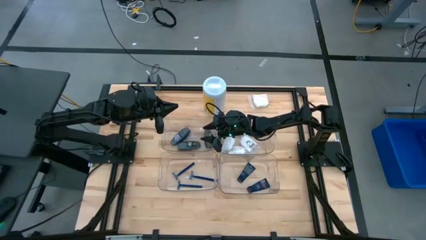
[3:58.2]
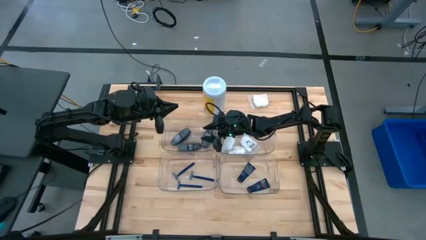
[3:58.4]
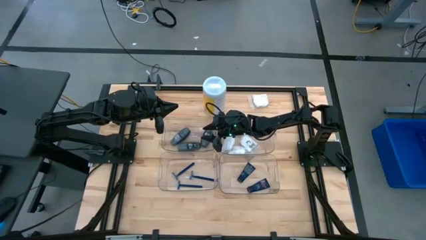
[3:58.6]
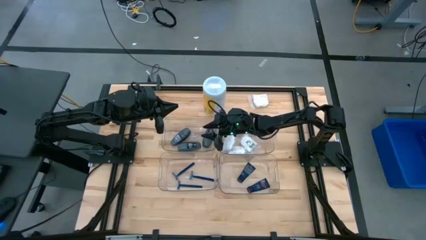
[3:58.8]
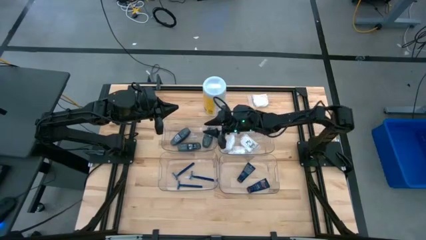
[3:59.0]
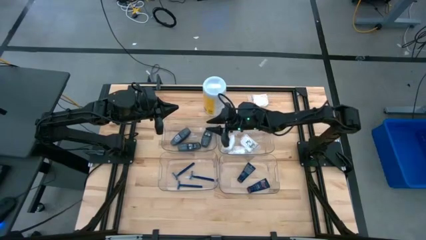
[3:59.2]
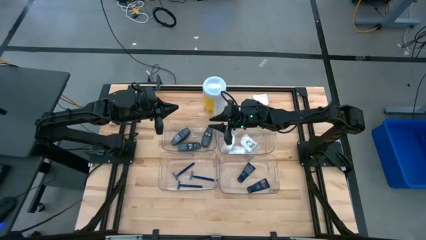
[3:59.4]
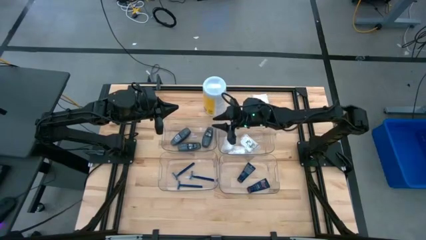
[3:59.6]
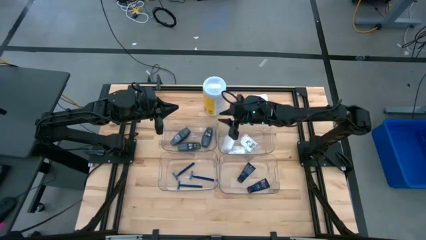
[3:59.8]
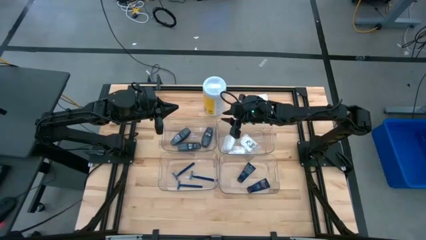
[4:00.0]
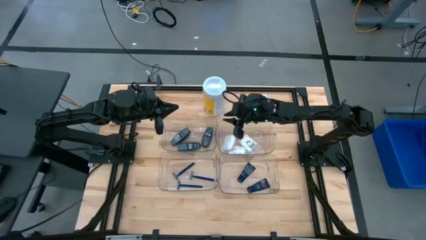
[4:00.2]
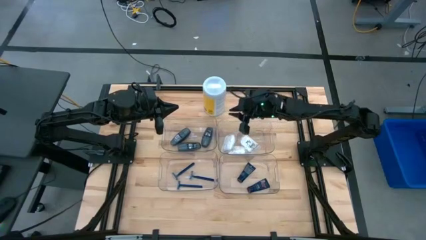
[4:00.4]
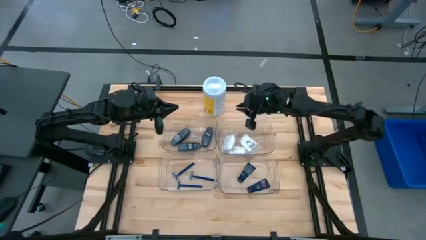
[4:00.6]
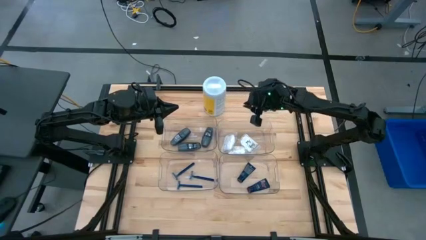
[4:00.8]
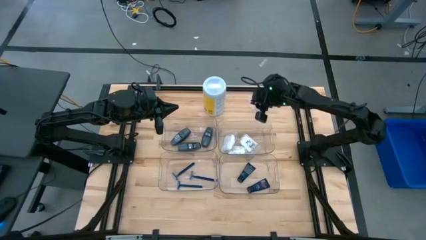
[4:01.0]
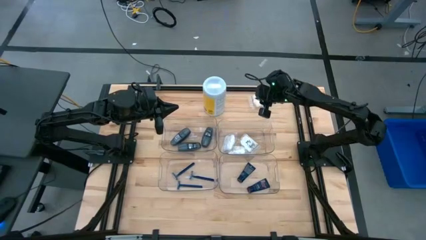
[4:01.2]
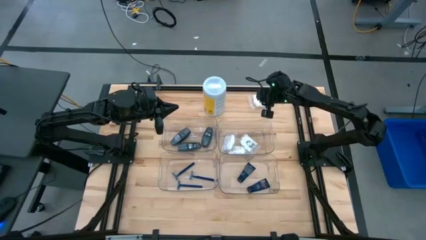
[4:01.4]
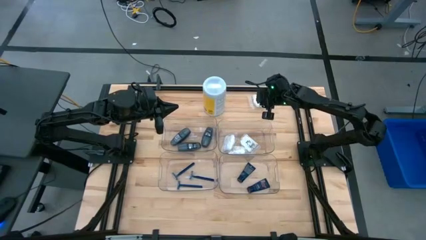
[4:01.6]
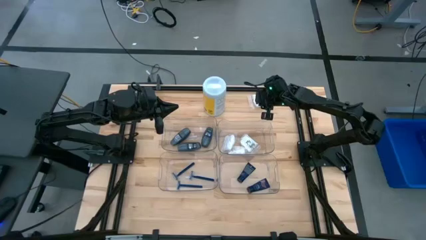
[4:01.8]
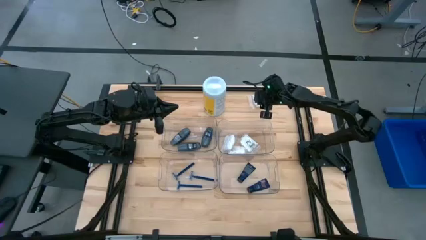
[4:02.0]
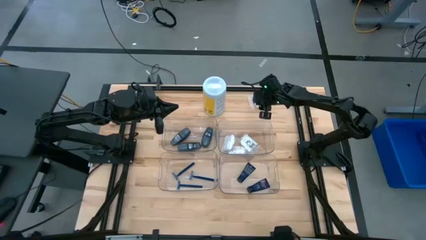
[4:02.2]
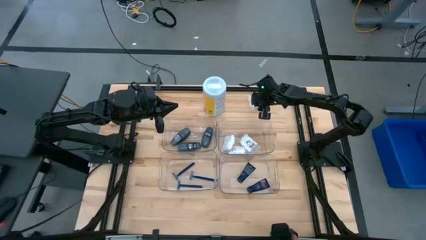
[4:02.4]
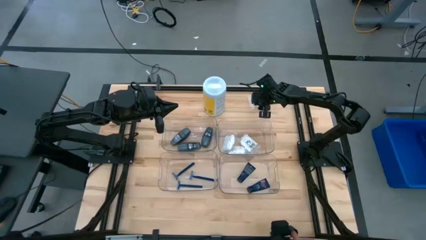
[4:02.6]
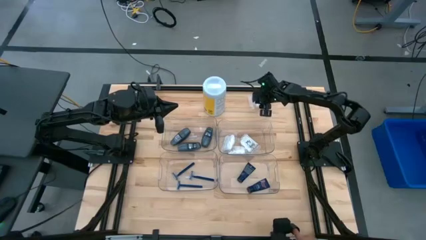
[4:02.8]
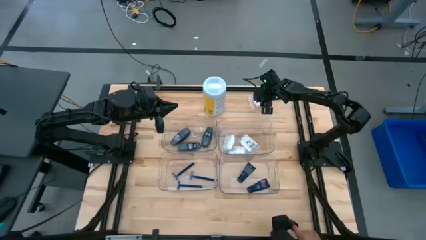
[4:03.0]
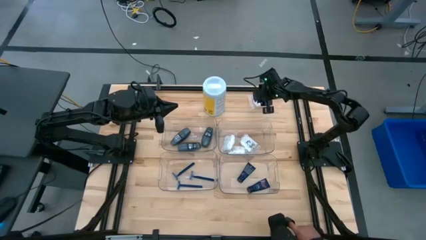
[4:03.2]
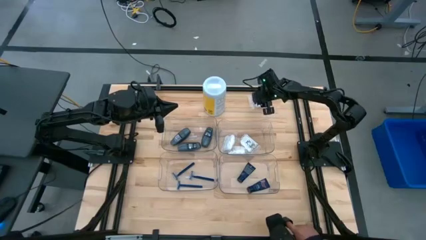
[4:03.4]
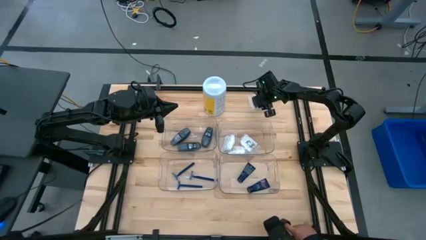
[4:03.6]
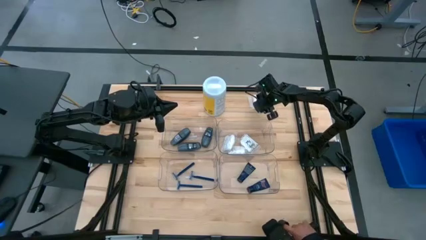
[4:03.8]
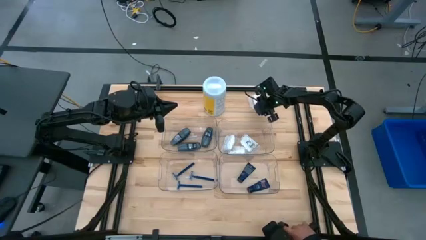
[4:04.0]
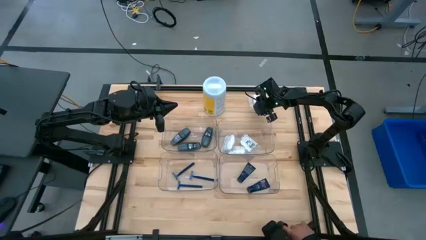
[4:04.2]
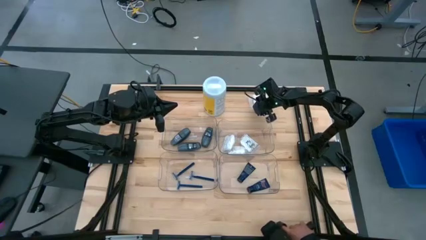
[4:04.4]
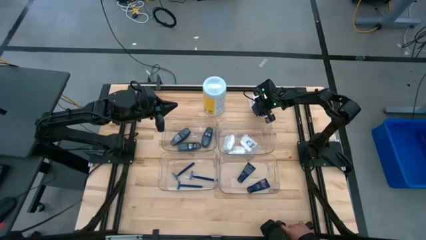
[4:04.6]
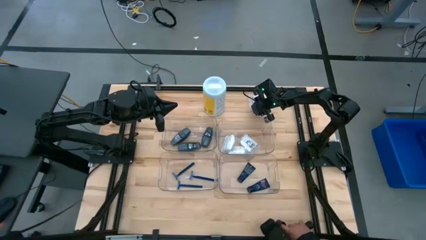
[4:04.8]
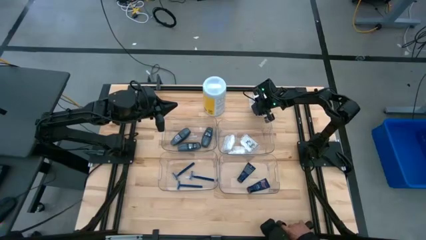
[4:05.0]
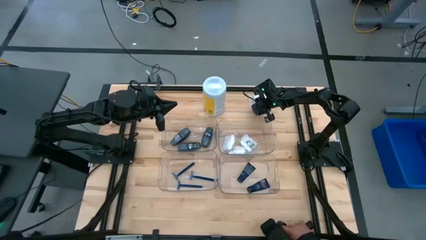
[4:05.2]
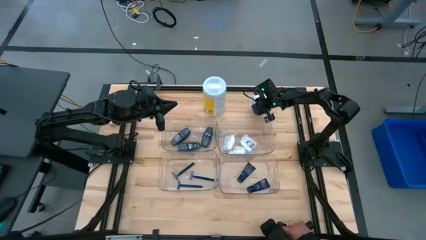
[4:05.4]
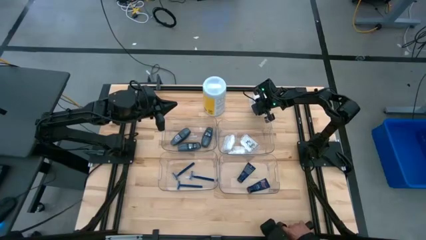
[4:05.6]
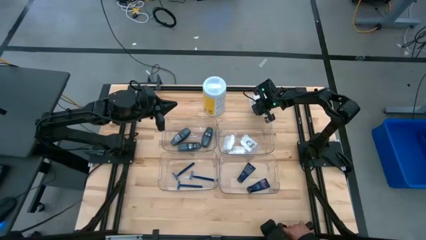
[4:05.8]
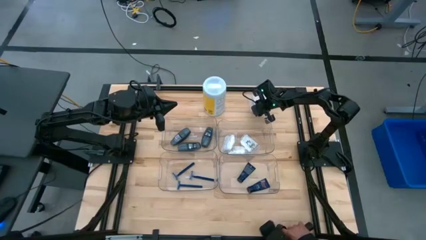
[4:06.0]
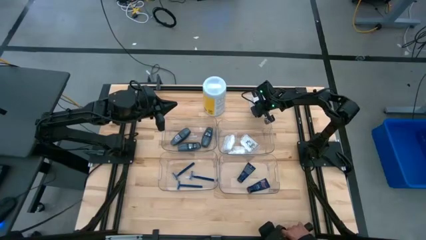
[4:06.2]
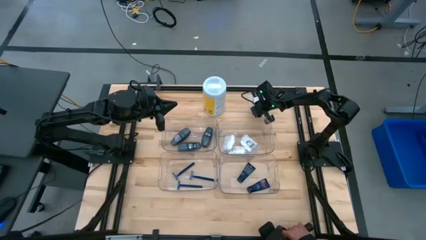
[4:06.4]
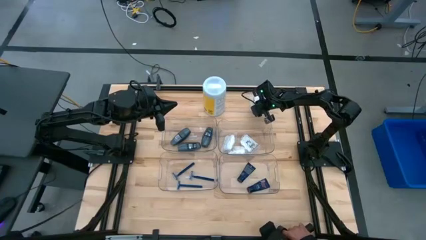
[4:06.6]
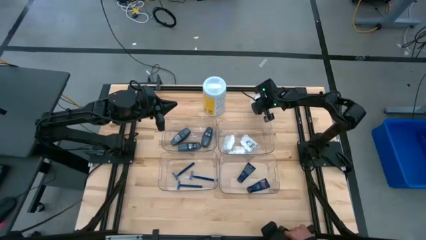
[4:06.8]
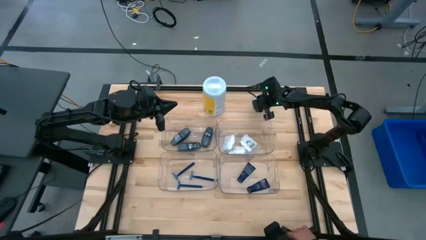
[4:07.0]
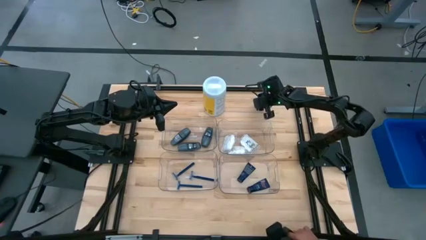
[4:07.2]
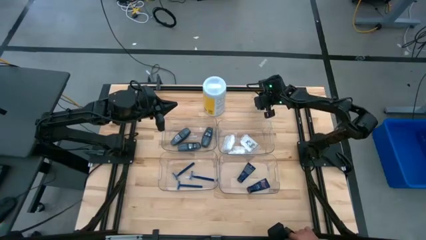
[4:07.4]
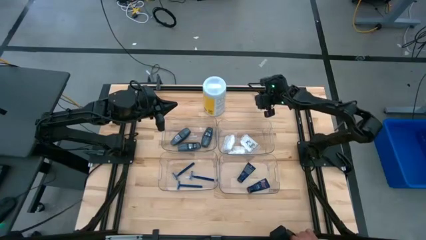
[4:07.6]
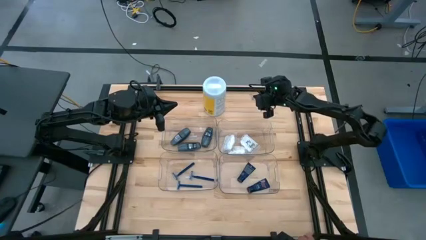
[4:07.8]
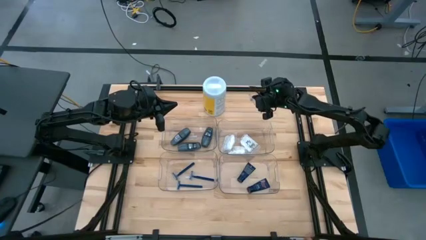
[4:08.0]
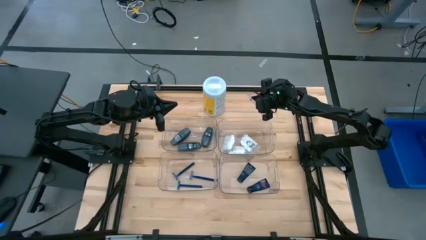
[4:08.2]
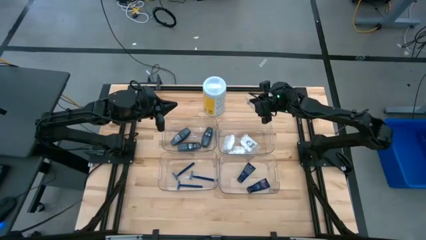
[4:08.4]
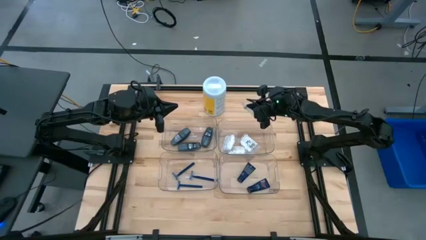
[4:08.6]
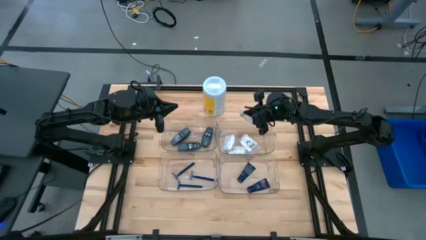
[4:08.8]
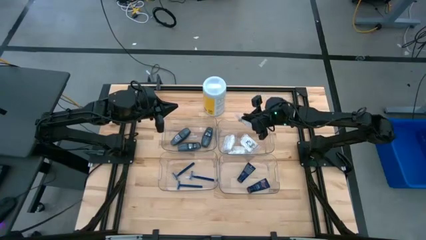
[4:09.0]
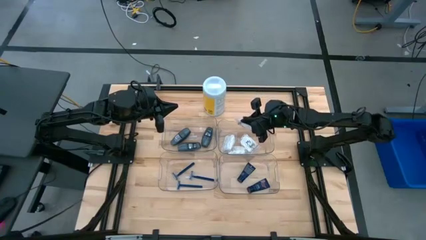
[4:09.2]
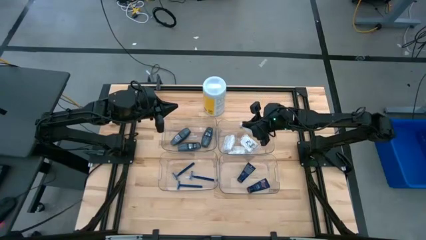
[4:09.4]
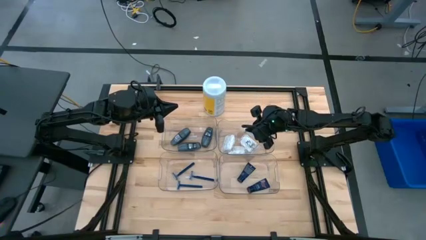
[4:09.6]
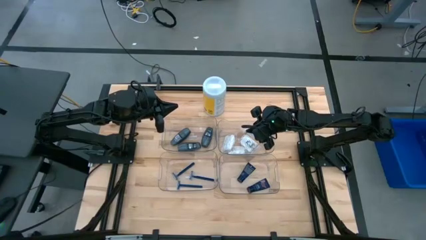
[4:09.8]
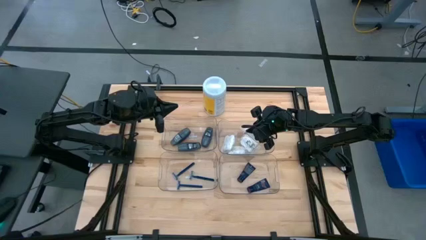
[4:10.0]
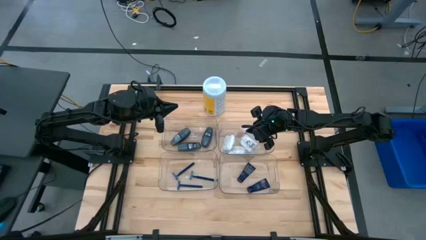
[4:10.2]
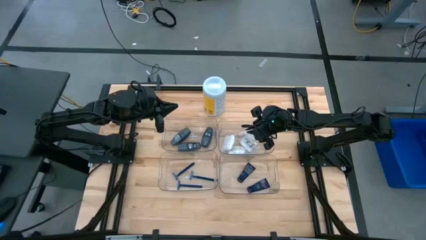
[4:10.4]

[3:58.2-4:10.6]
Task: Pick & Place Travel size toiletries
Put the transparent vanity pack into the top right transparent bin

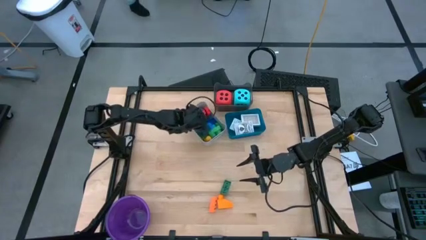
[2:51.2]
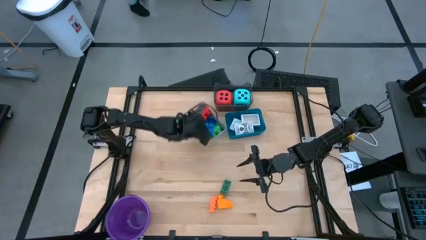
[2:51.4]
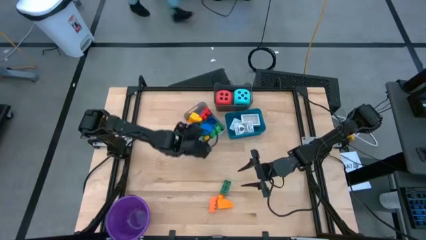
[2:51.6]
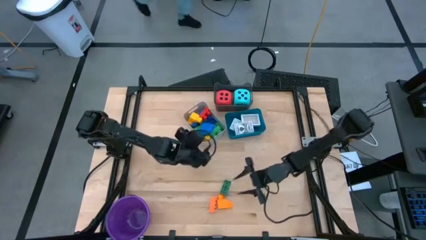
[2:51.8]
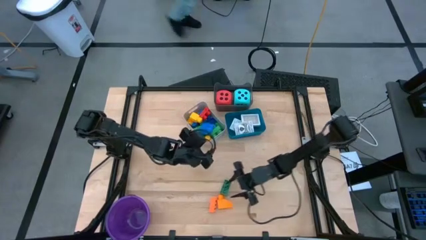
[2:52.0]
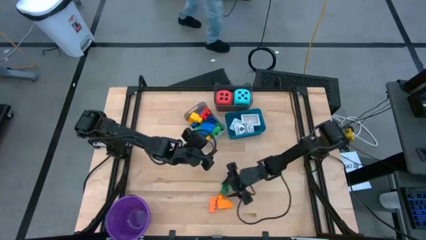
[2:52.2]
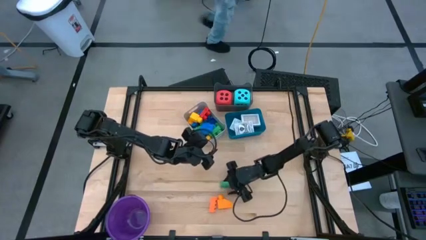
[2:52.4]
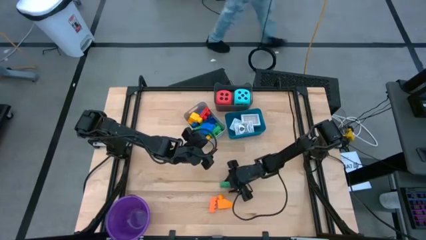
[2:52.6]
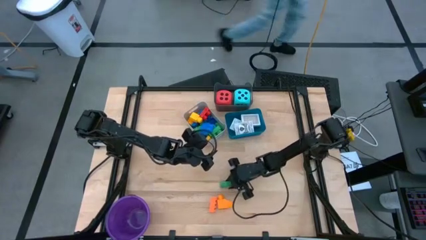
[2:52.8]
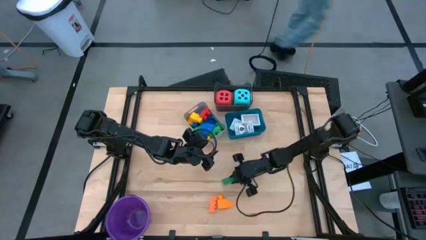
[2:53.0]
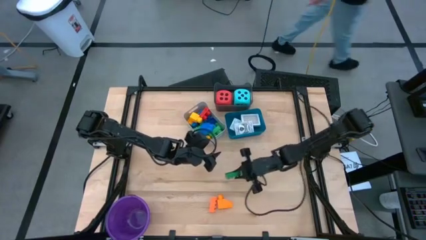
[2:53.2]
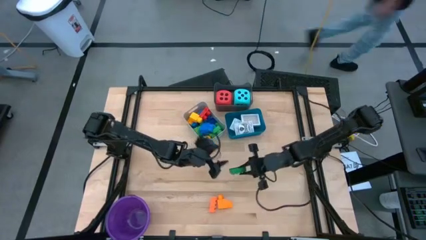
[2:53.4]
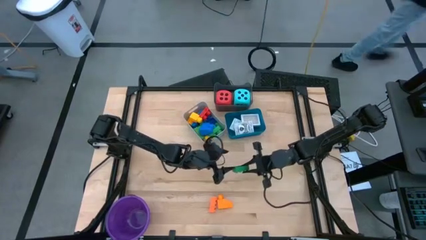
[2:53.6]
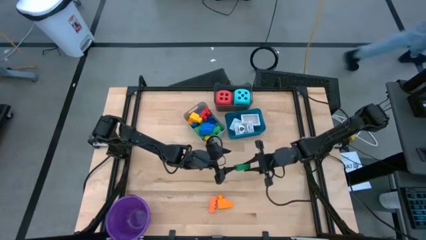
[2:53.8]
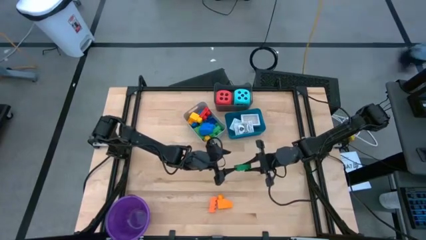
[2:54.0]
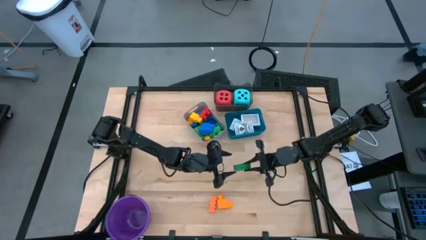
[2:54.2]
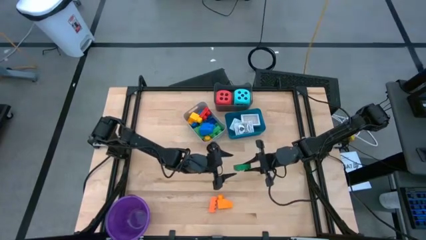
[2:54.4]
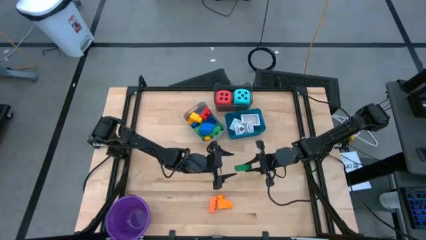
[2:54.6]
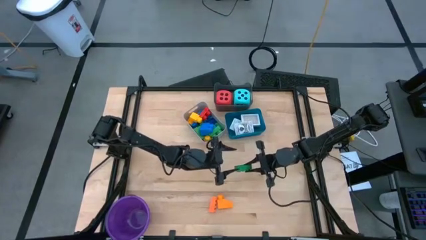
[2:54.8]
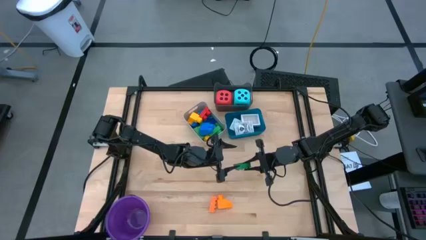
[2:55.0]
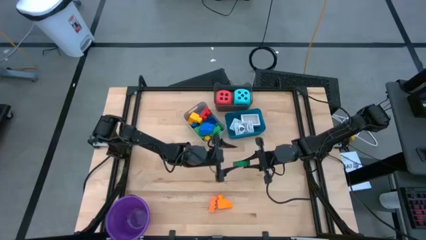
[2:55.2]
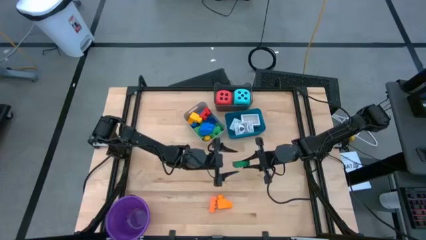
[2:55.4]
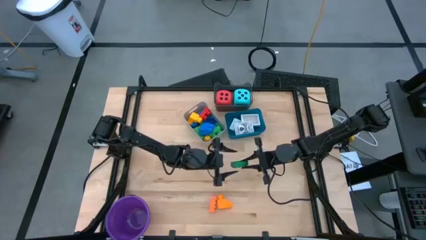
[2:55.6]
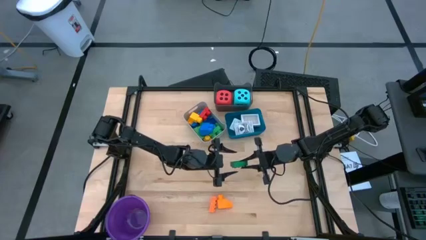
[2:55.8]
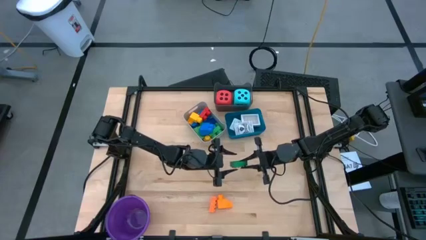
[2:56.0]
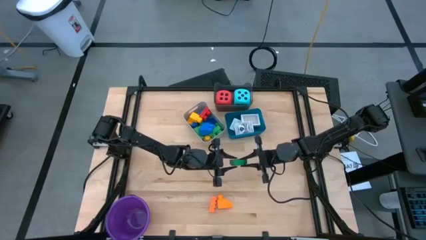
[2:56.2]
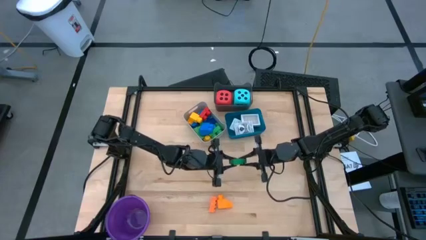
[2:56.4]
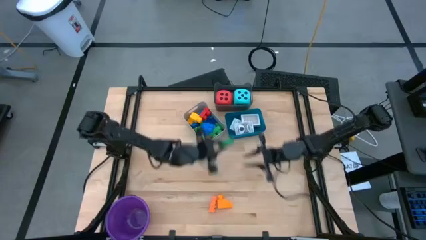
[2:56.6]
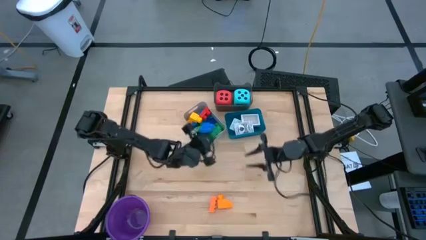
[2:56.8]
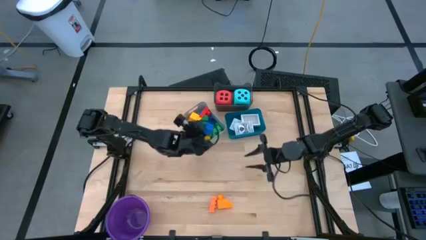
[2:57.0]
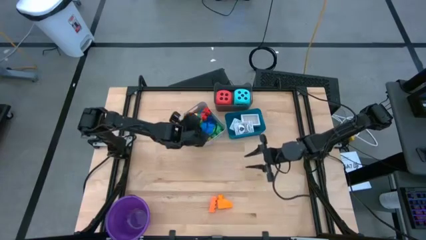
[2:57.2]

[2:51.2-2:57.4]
Task: Pick & Place Toys
Put the green game piece into the gray bin
